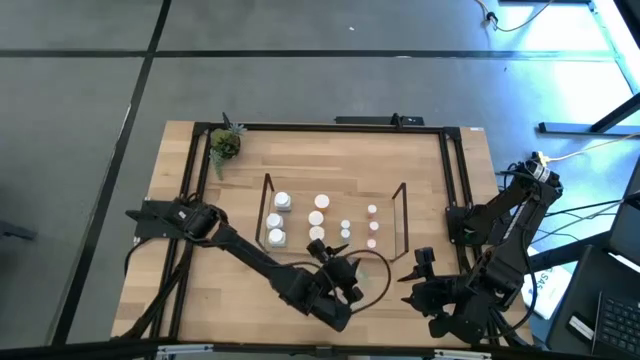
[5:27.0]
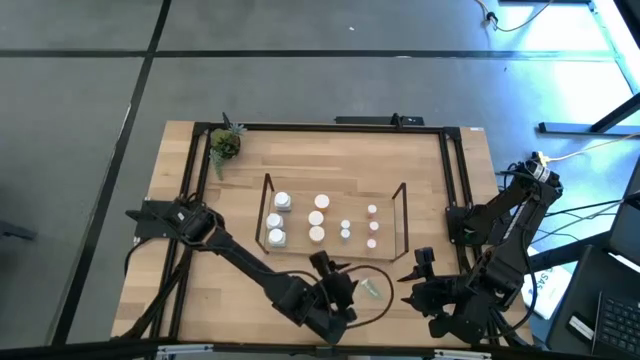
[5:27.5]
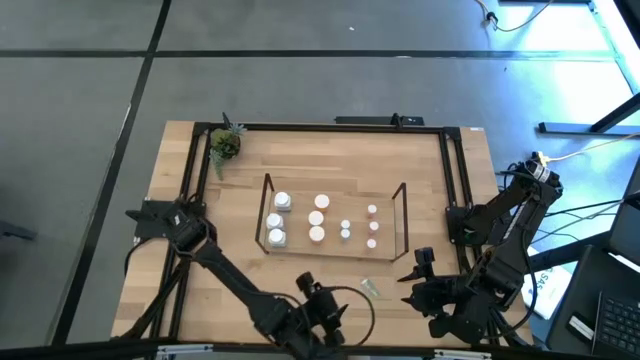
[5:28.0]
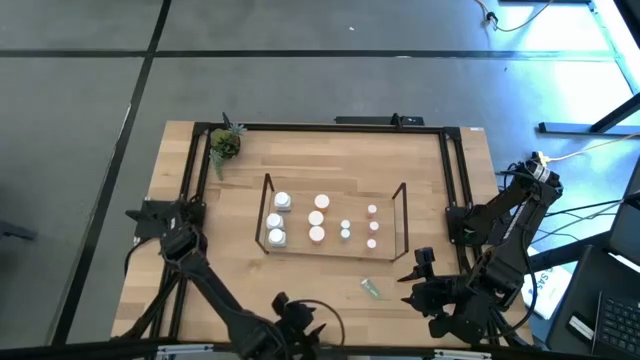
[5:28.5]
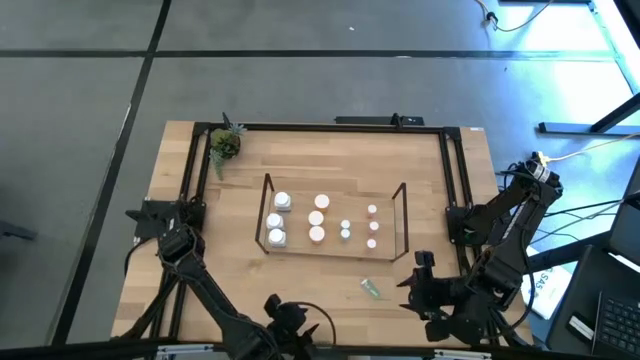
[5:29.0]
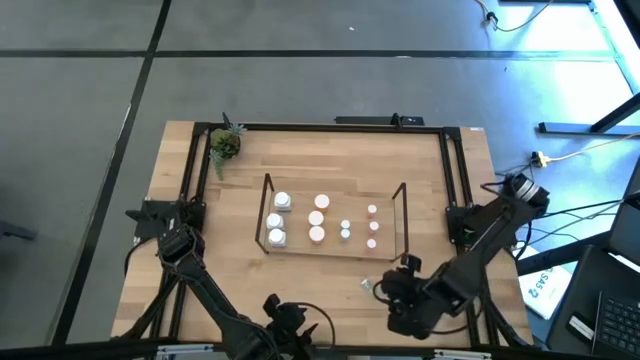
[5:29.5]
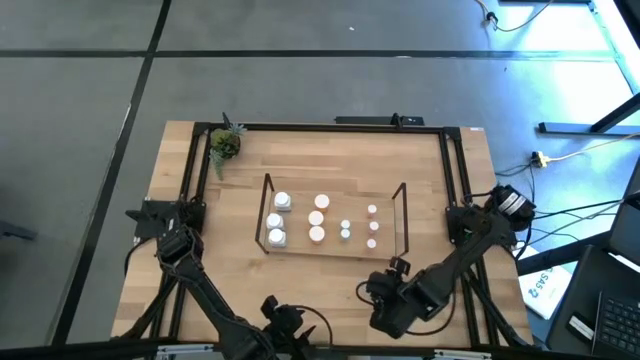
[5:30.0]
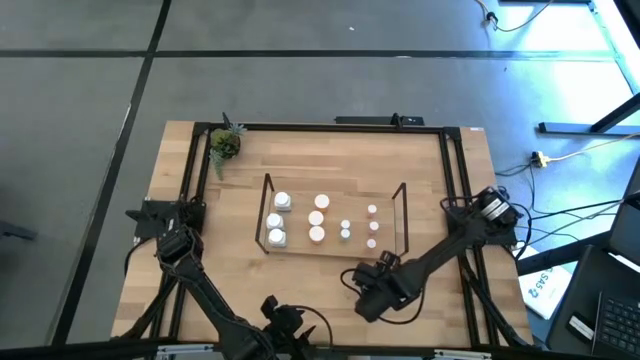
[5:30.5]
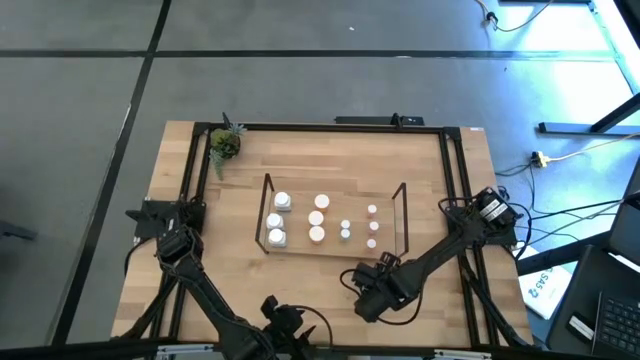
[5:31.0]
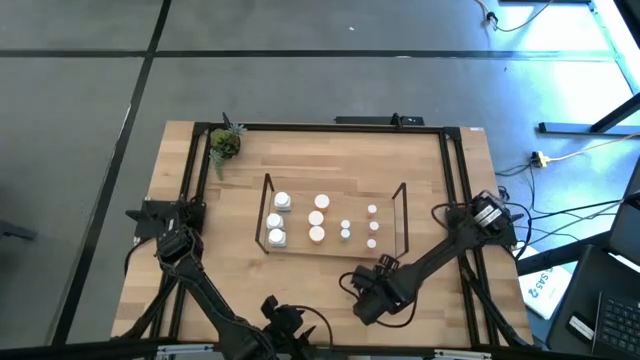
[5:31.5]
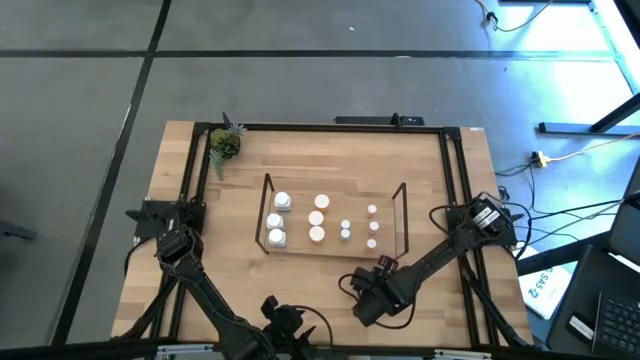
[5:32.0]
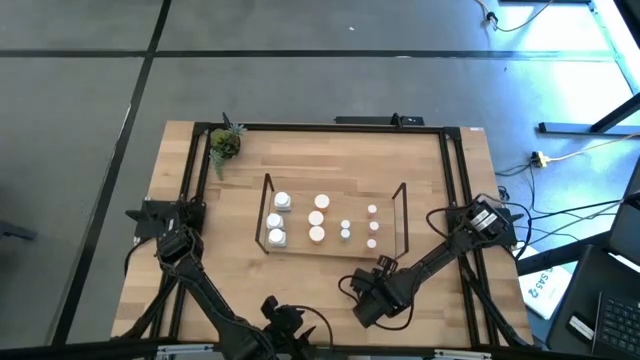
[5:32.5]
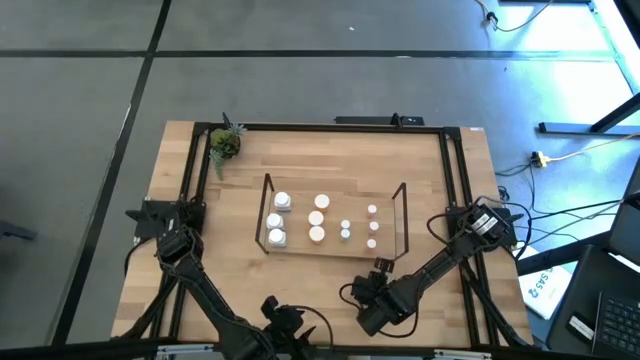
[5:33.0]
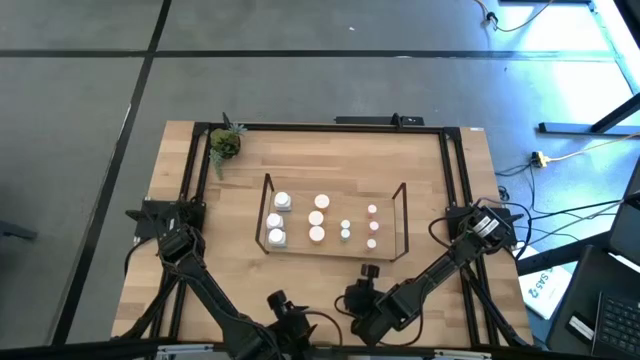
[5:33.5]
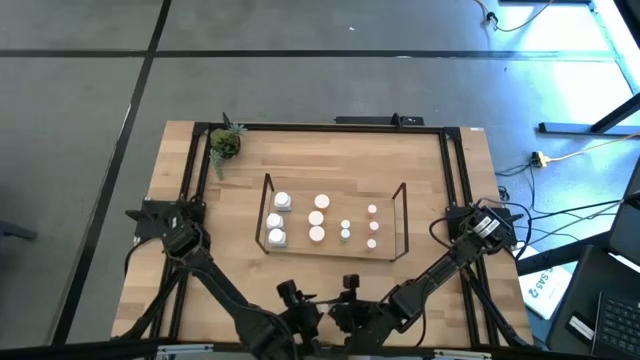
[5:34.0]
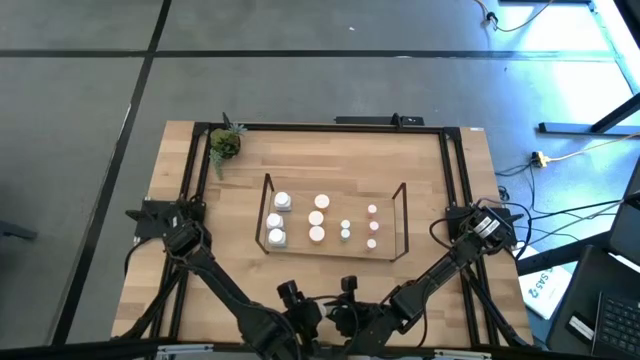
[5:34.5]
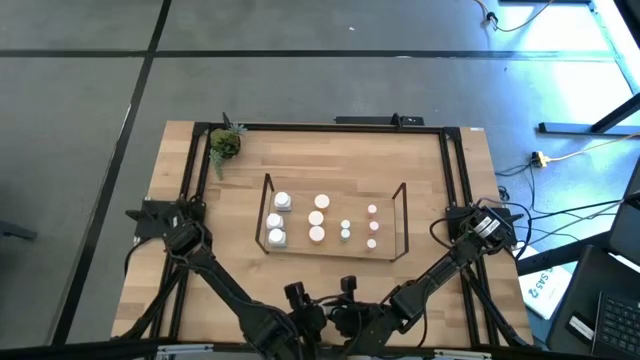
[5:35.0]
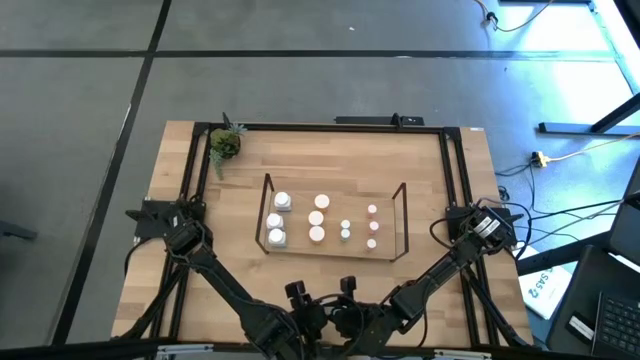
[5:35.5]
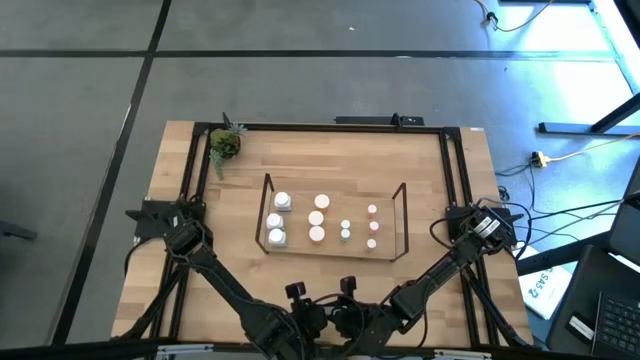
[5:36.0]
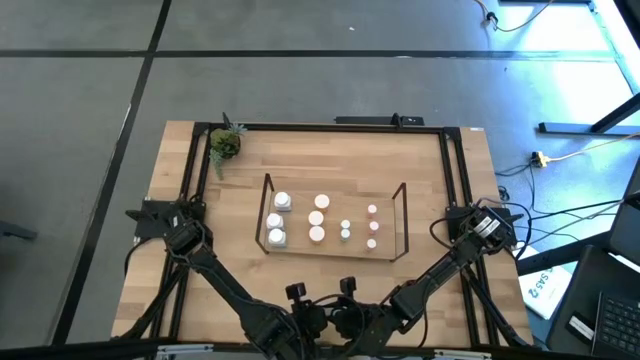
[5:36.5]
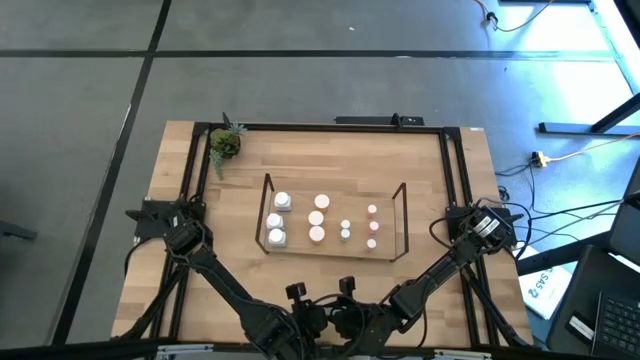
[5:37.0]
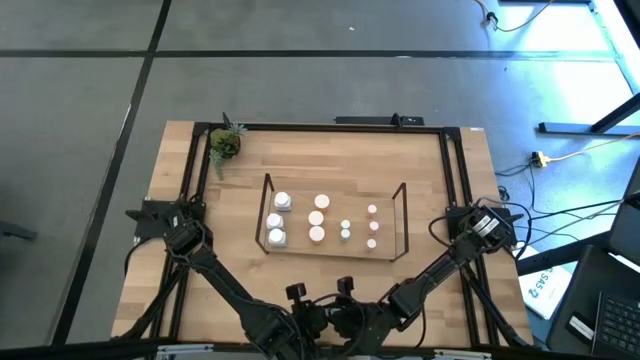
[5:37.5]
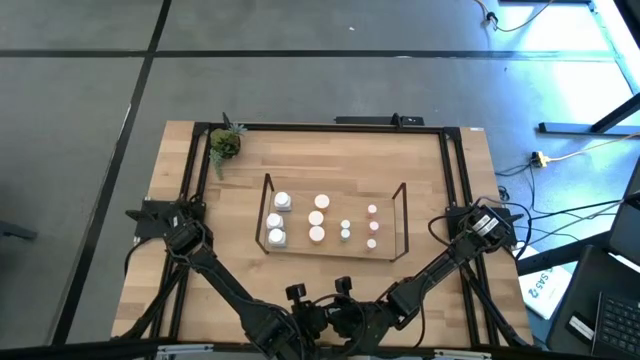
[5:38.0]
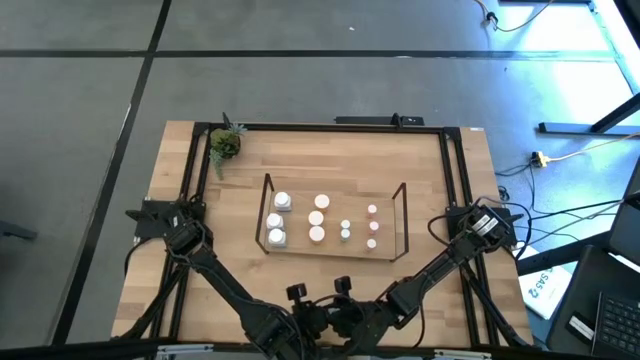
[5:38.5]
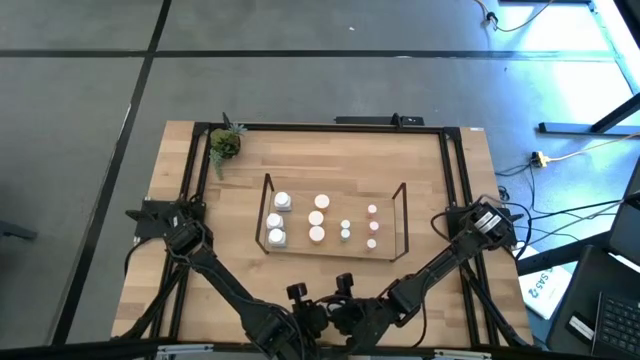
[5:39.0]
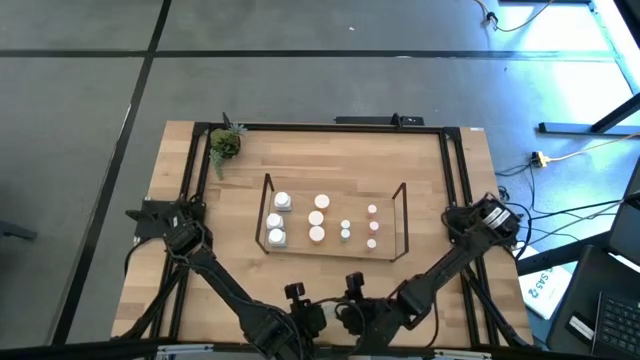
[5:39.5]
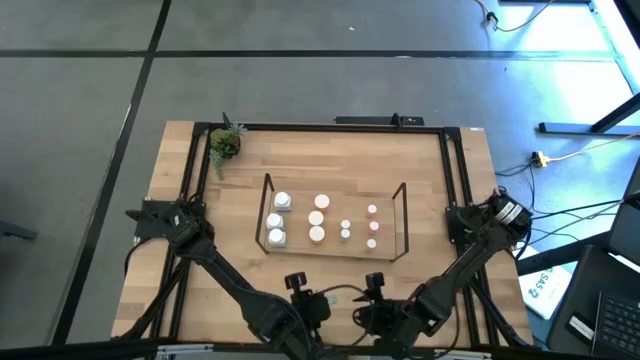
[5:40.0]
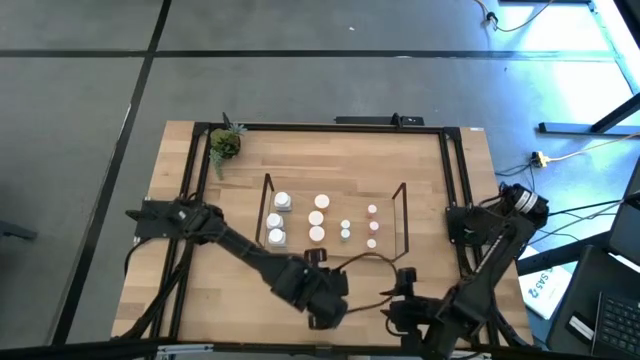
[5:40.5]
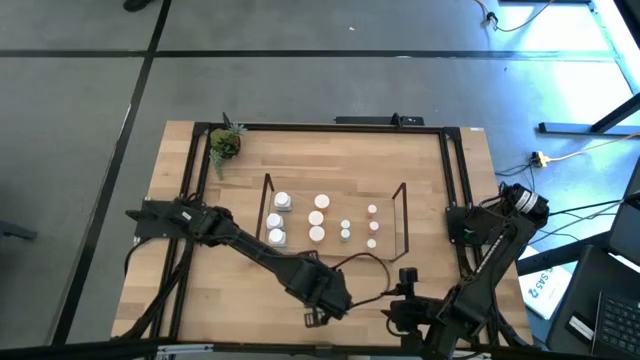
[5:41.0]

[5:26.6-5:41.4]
Task: Pick and place medicine bottles onto shelf by color
Put the light blue pill bottle on the shelf aligned with the other light blue pill bottle

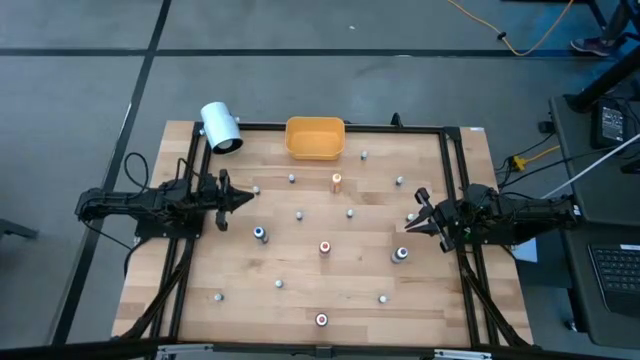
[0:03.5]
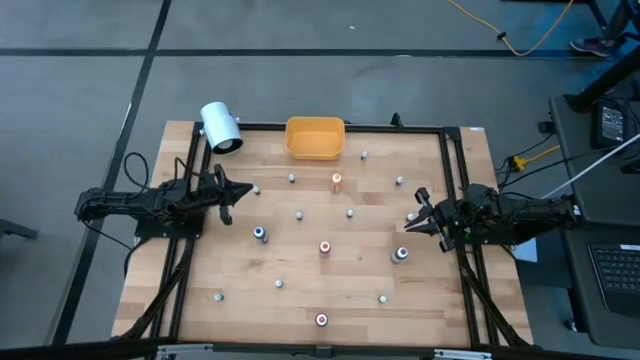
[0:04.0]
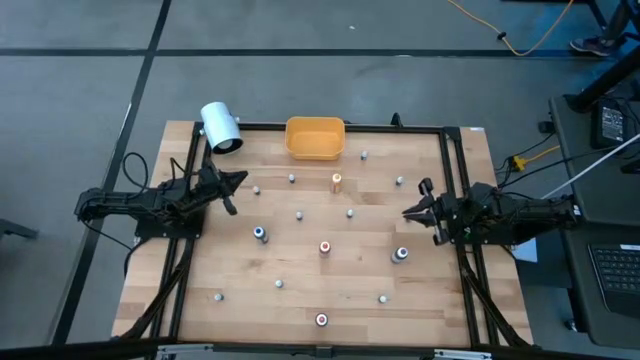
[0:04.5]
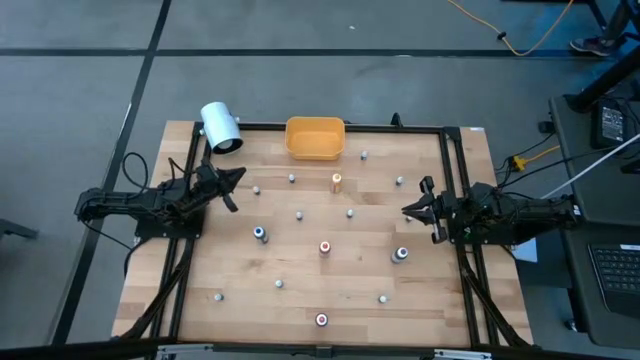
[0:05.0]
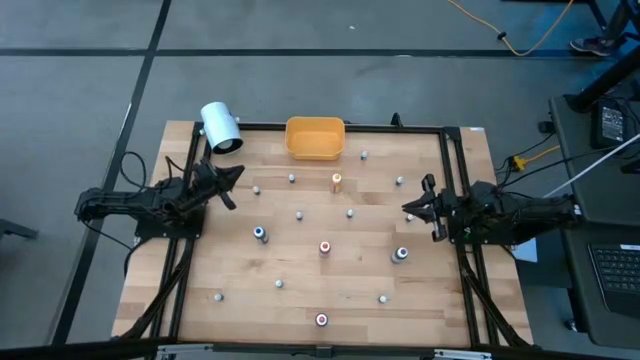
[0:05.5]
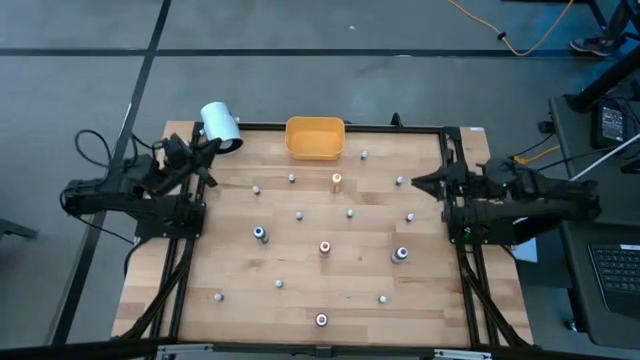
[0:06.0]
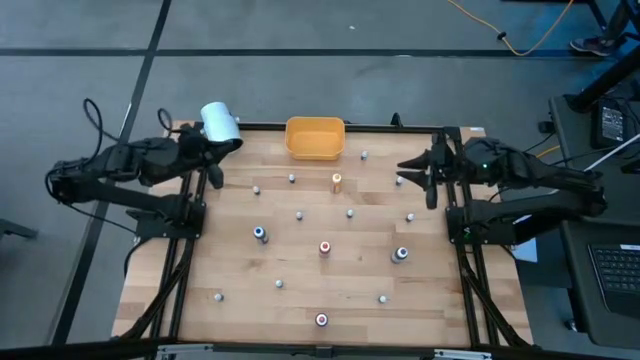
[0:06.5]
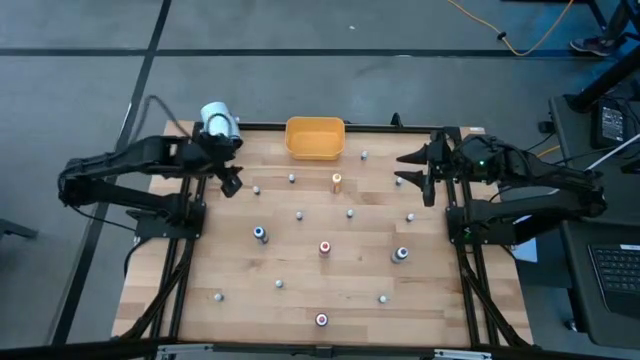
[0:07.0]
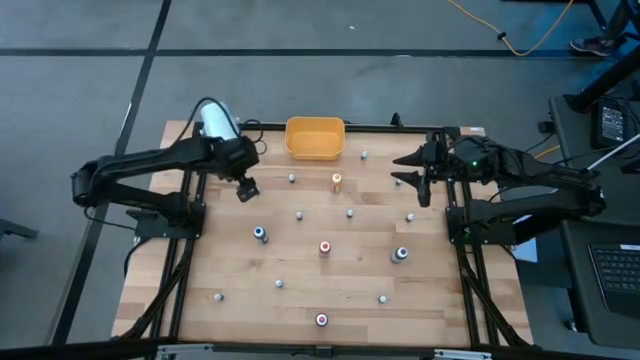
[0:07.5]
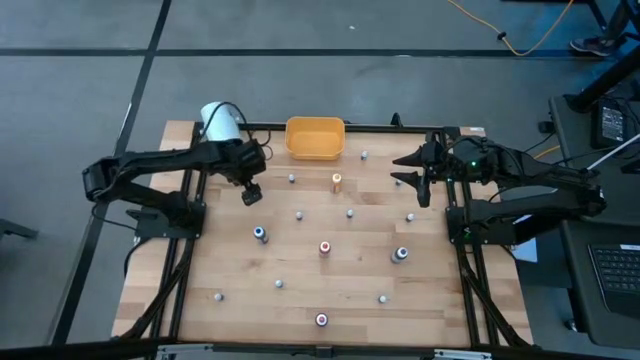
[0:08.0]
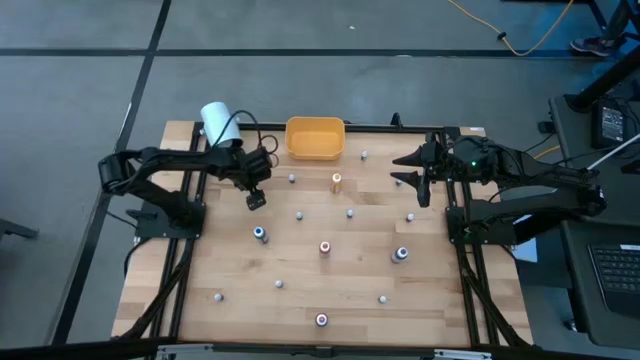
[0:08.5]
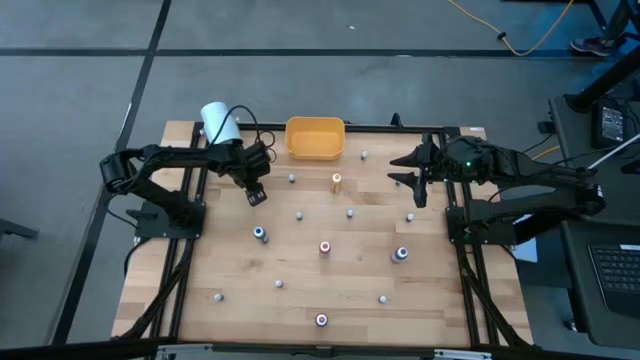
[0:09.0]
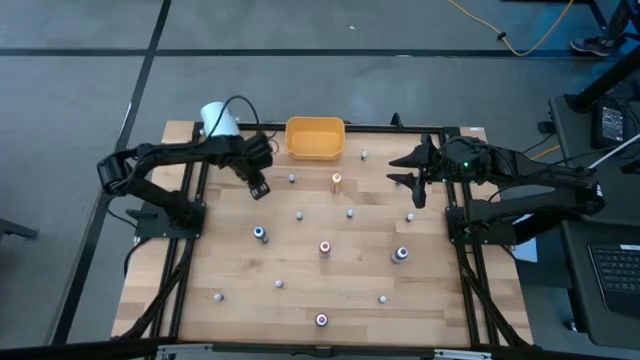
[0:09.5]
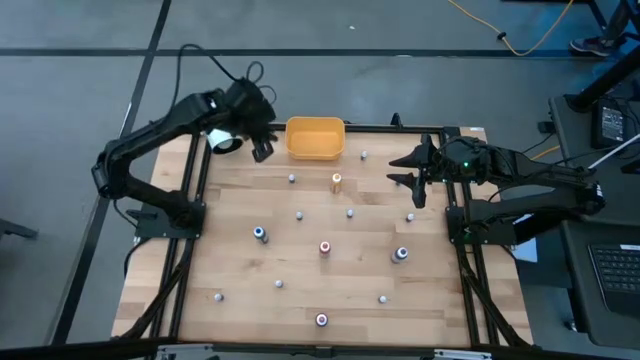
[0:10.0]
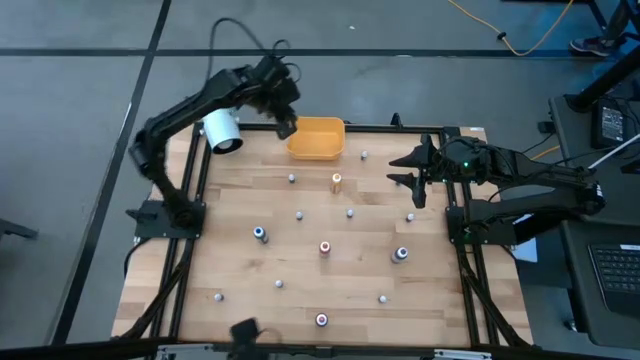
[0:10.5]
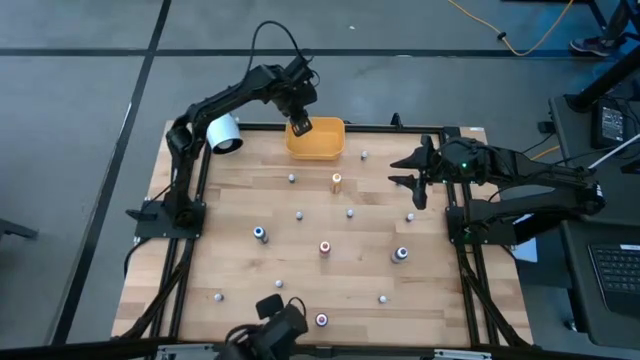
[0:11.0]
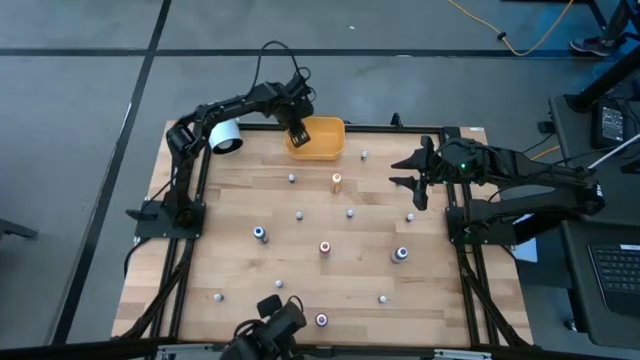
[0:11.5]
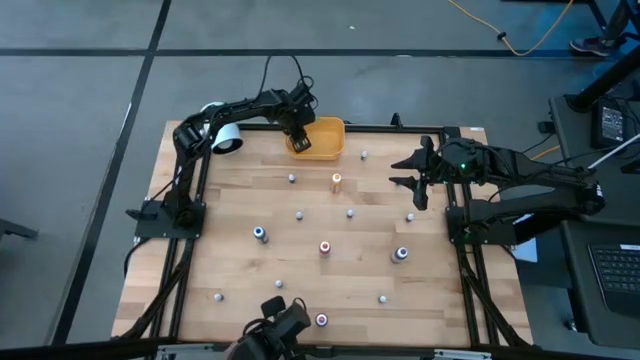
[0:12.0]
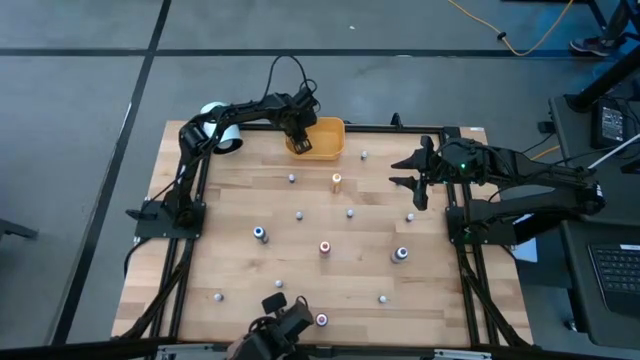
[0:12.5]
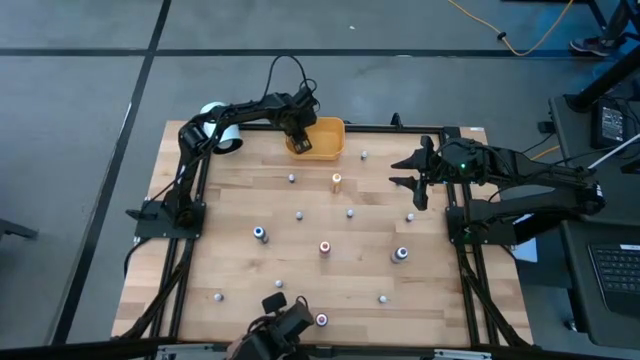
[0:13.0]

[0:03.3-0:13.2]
Task: Pick & Place food coloring
Put the bottom green food coloring bottle into the yellow bin
